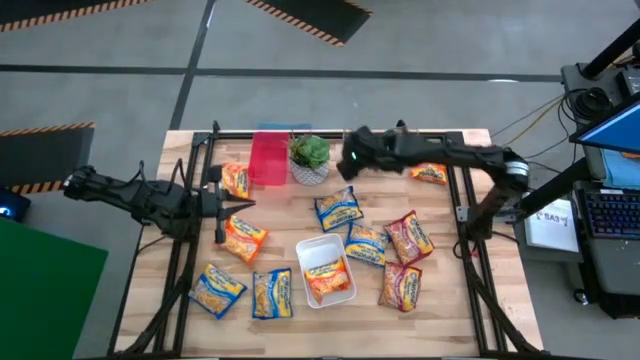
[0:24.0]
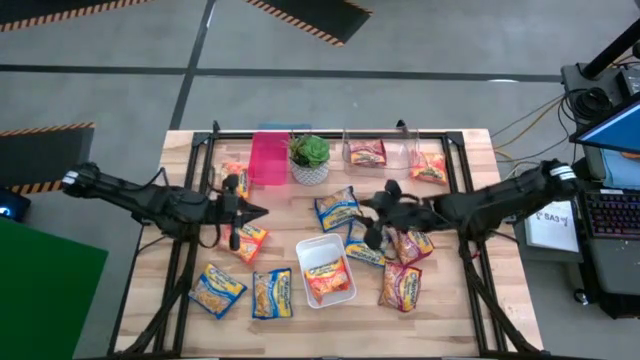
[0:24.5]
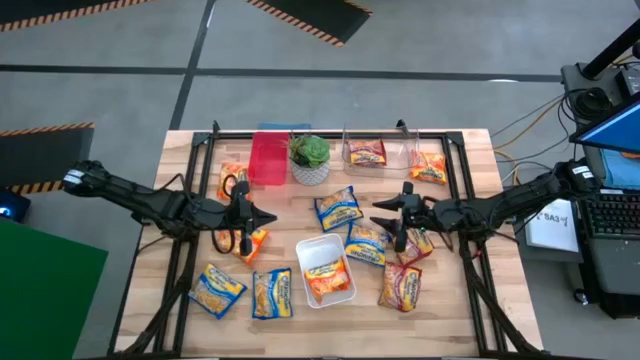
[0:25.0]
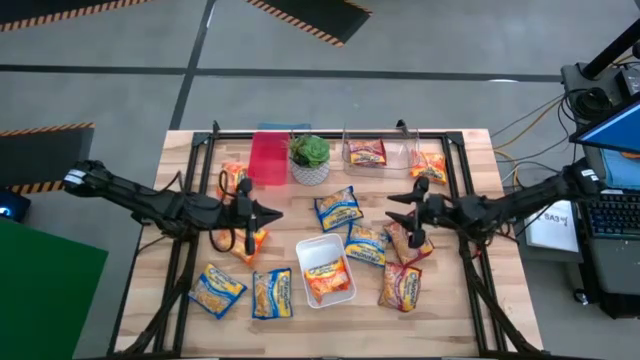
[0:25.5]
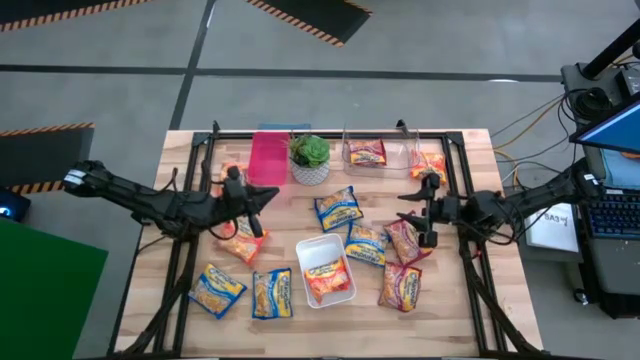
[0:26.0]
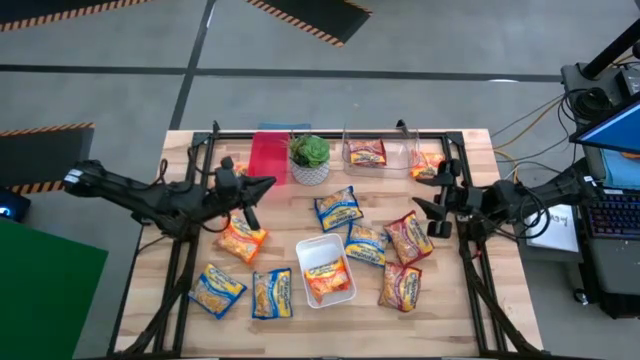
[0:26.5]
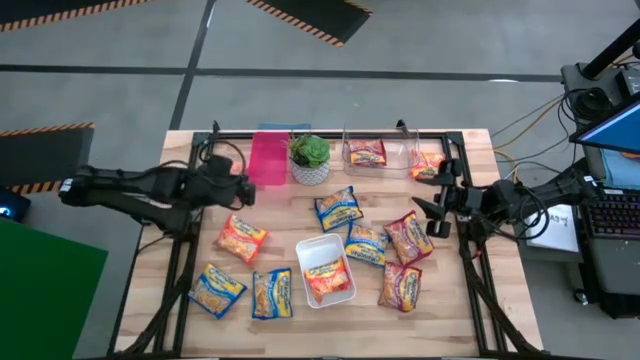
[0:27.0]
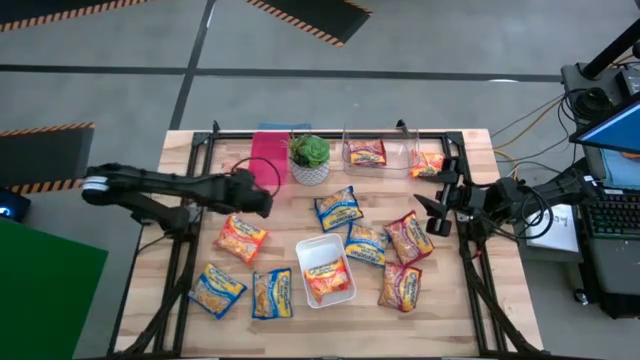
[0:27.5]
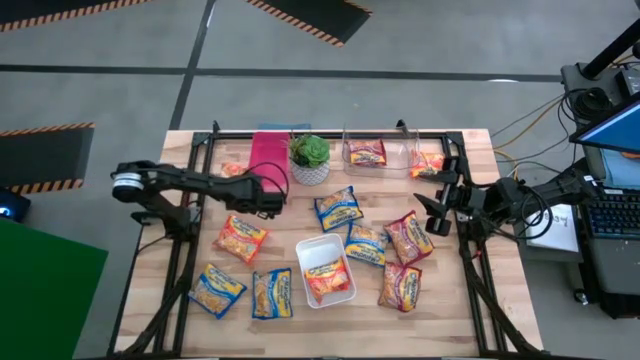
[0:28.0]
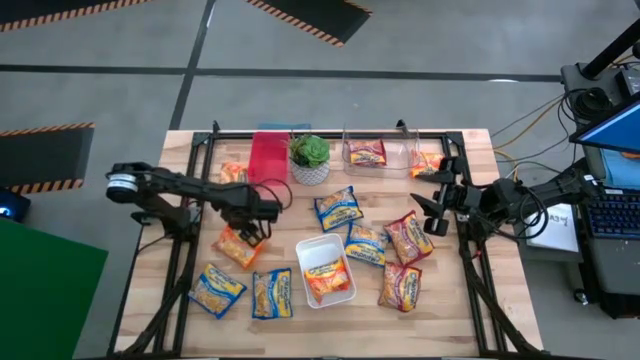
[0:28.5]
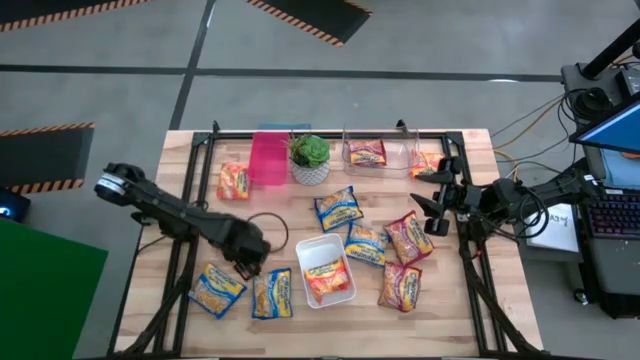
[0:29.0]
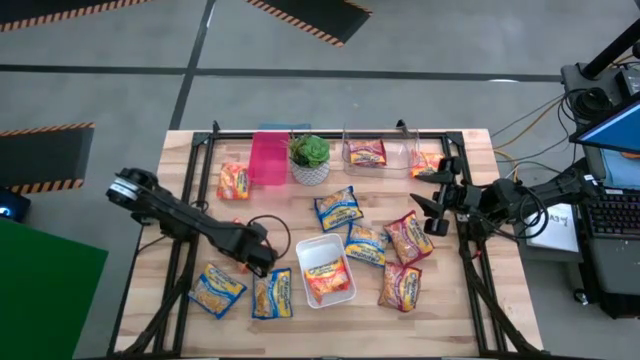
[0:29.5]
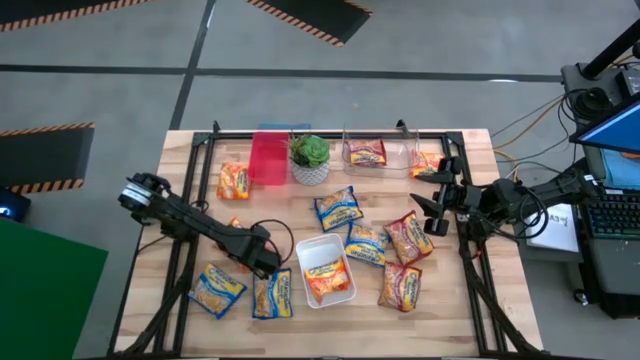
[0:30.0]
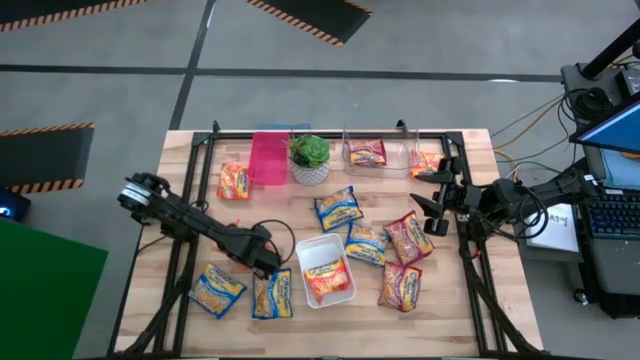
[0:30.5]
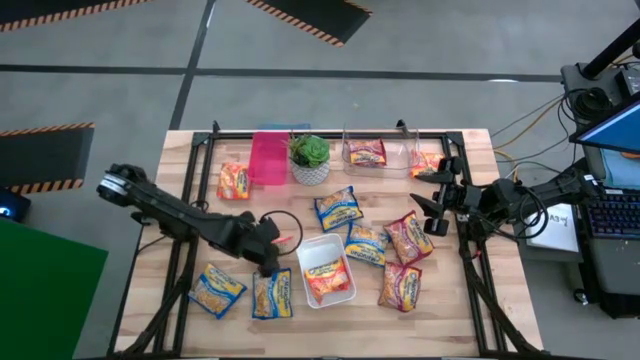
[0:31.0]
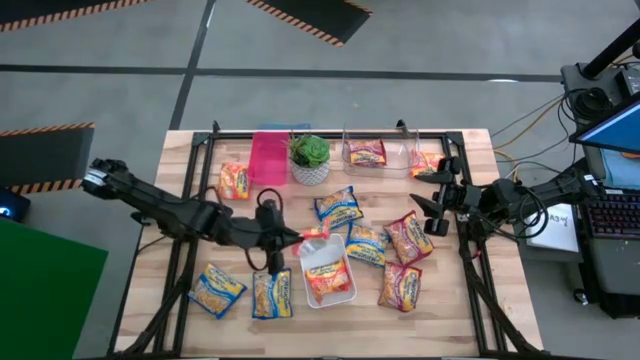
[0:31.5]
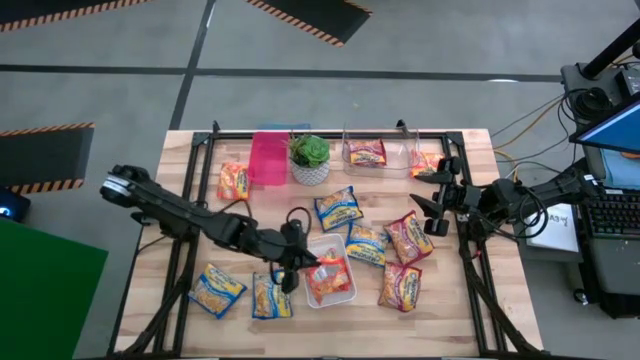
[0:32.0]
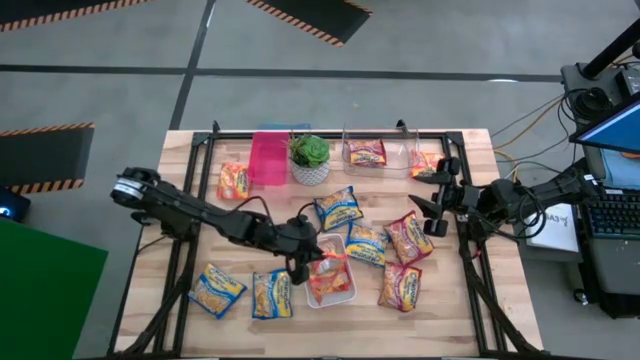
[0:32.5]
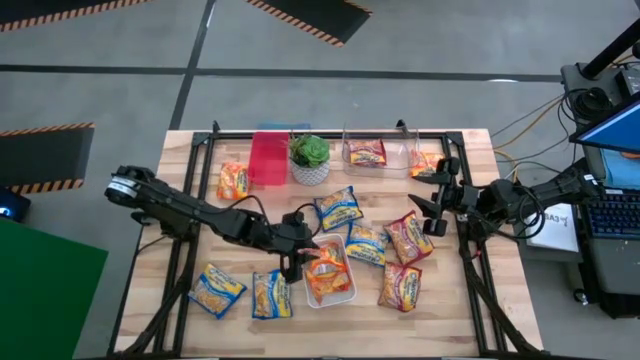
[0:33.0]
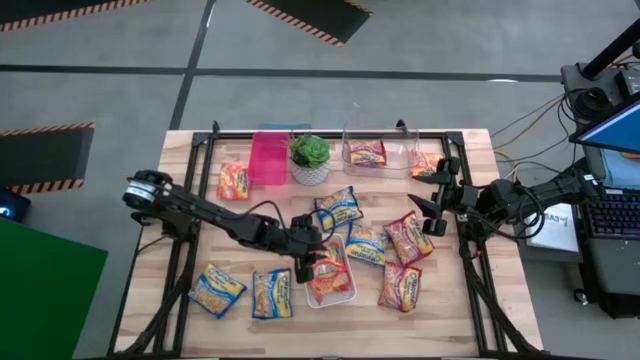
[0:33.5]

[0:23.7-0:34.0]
Task: Sort Maruchan noodles
Put the orange noodle pack into the white bin

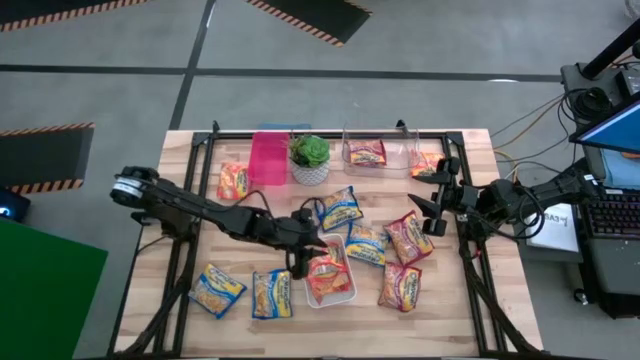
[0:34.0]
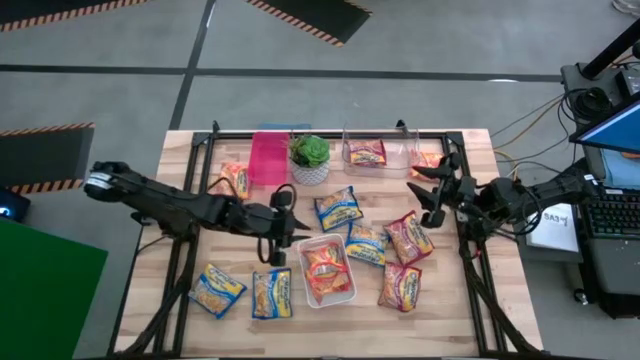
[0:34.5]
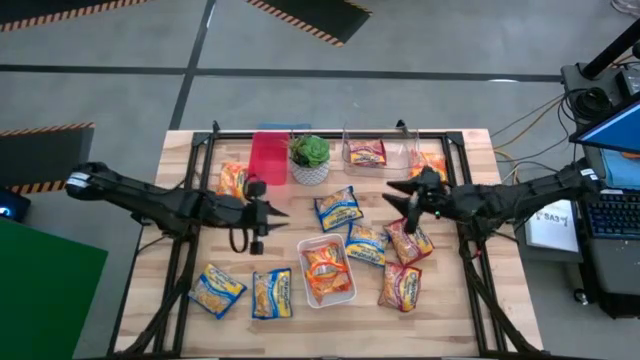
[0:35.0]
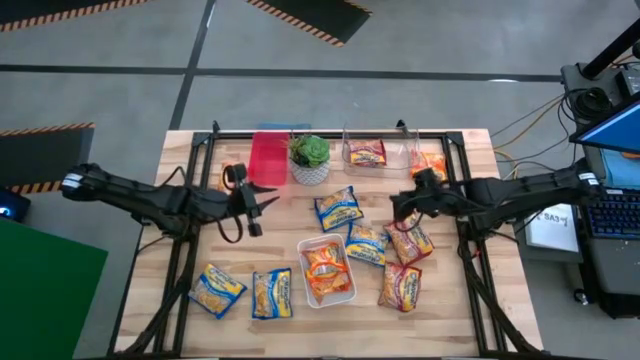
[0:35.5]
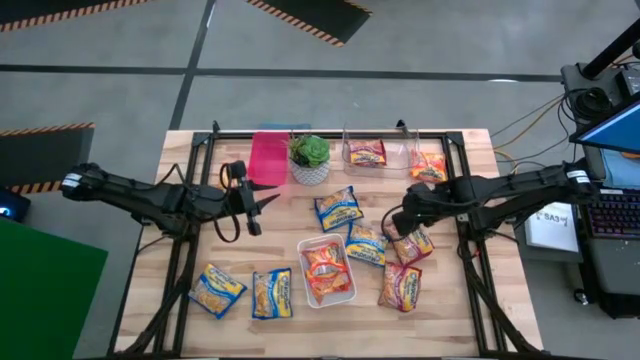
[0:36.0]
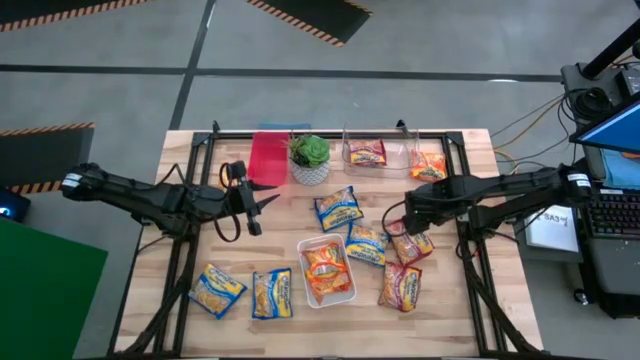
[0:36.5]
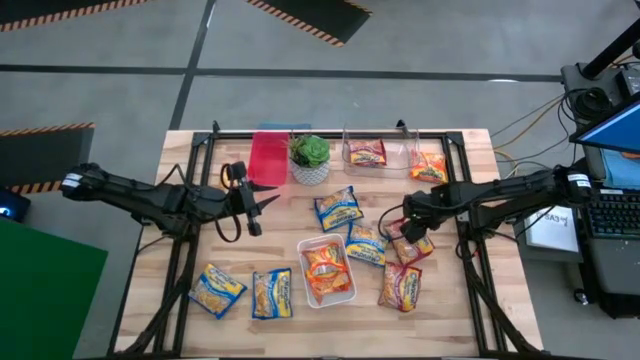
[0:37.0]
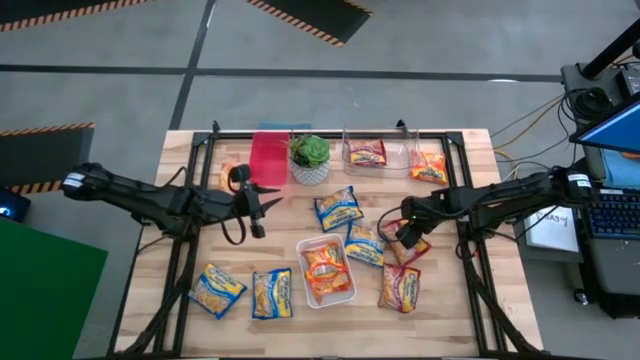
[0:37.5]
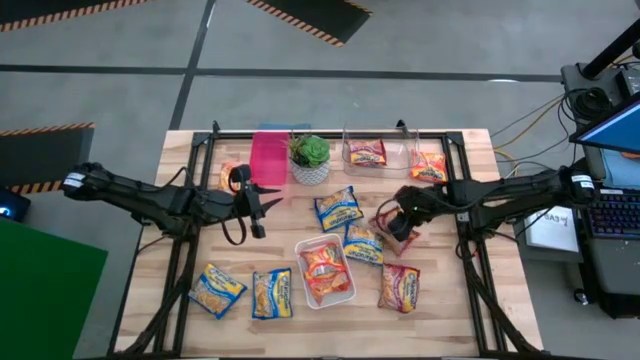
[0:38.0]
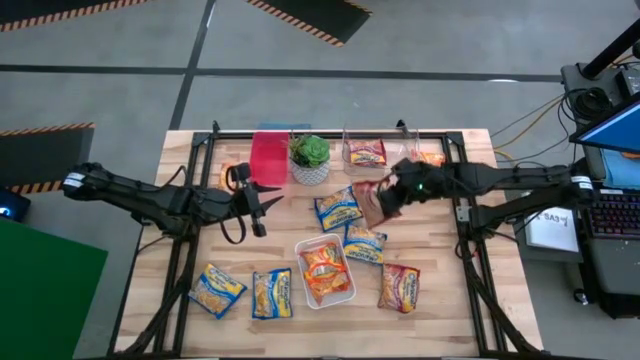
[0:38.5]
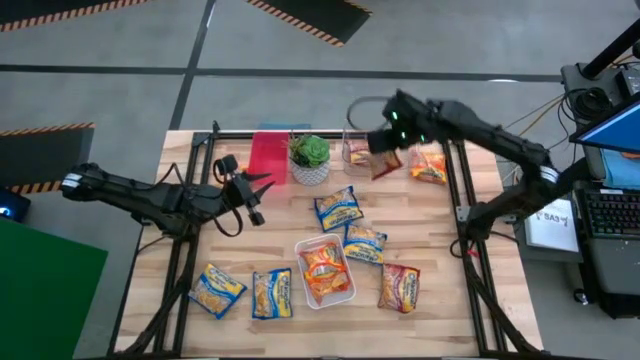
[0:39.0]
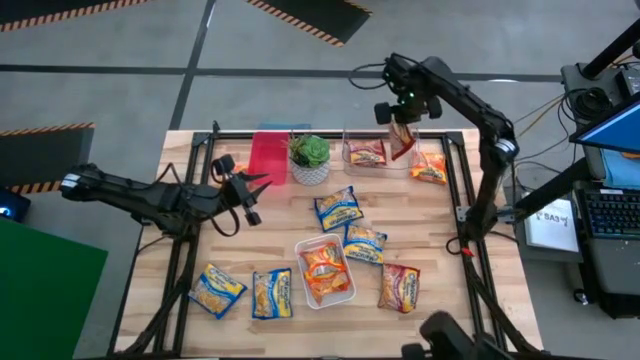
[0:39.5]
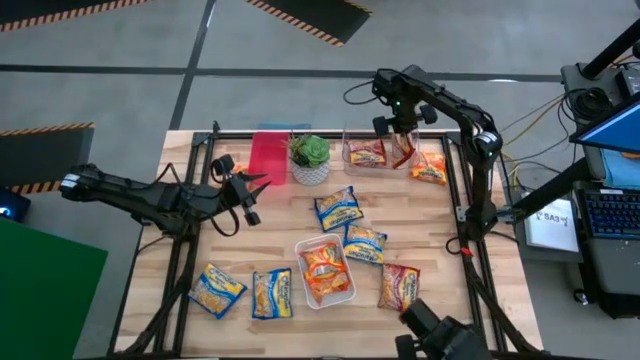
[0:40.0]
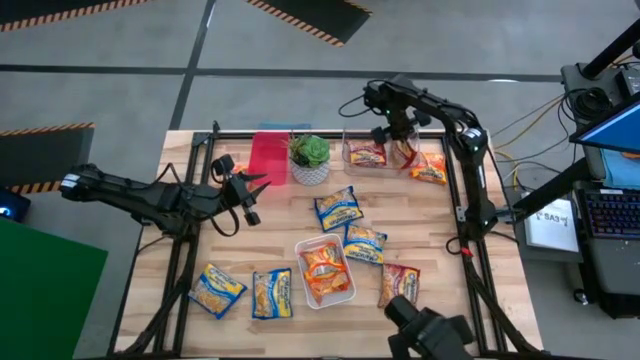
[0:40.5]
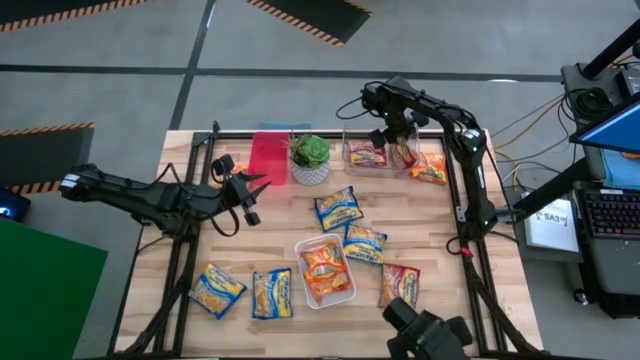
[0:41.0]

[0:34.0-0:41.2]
Put the red noodle pack into the transparent bin

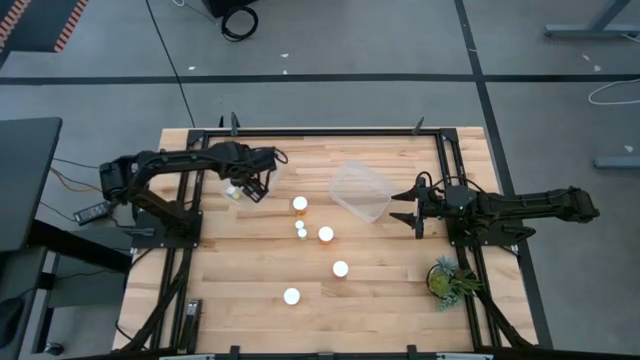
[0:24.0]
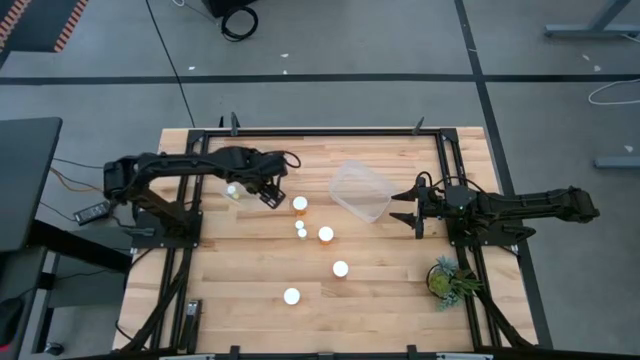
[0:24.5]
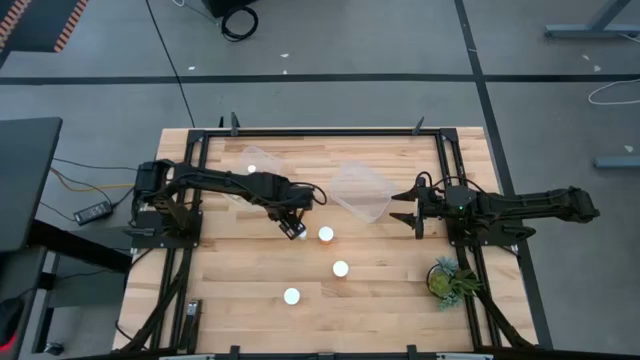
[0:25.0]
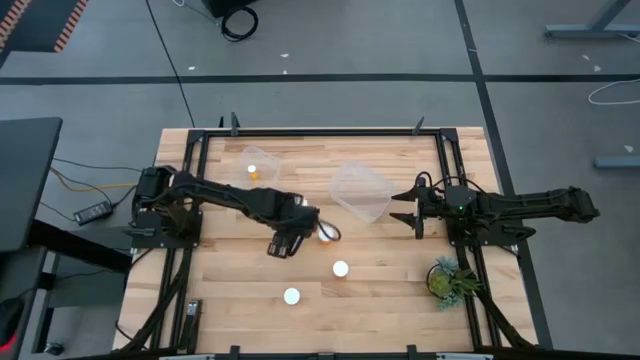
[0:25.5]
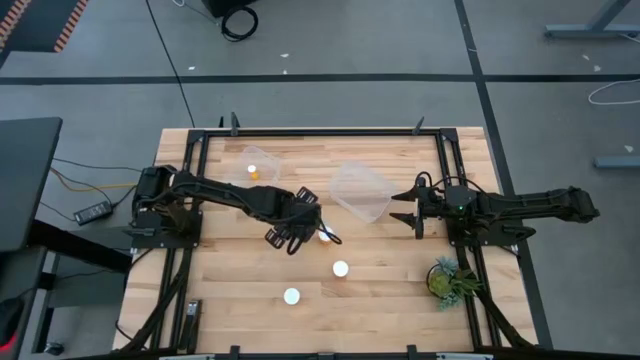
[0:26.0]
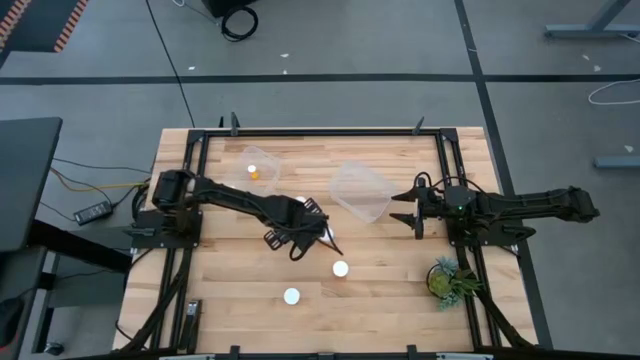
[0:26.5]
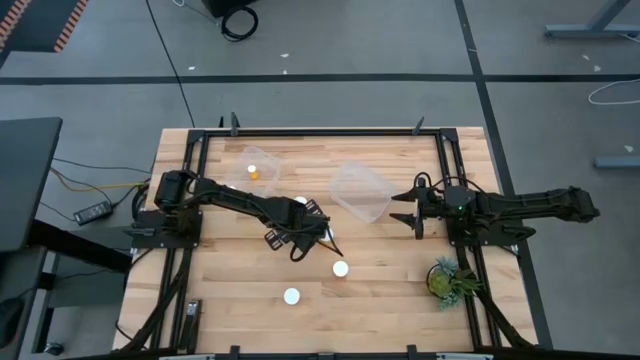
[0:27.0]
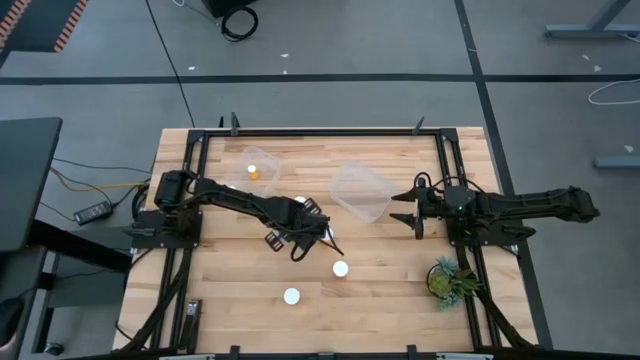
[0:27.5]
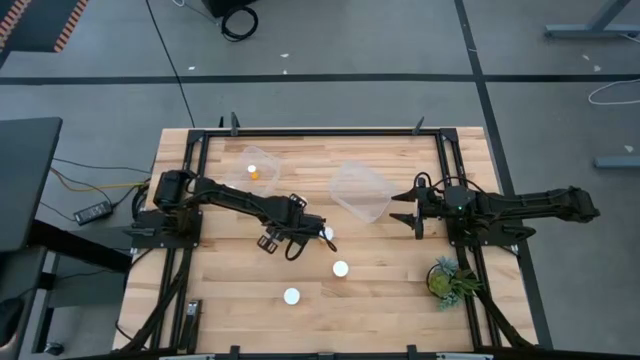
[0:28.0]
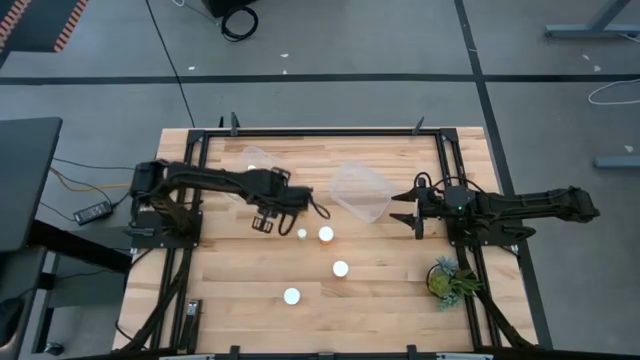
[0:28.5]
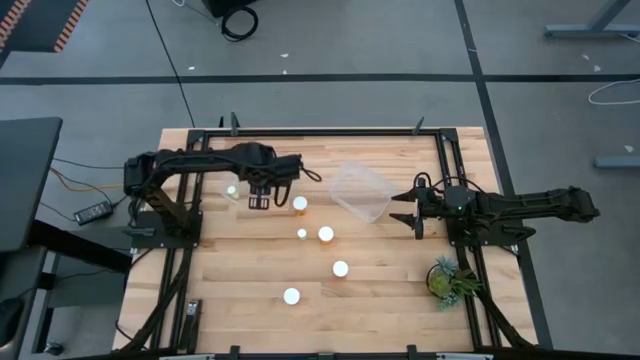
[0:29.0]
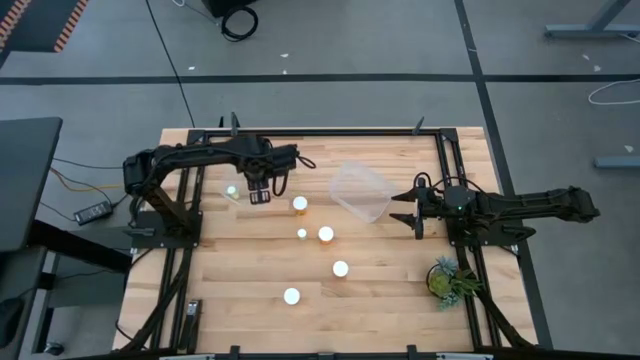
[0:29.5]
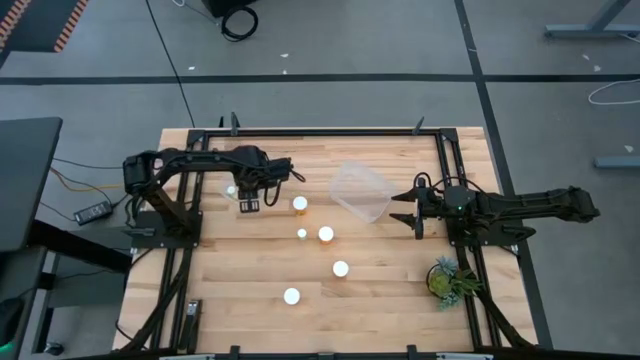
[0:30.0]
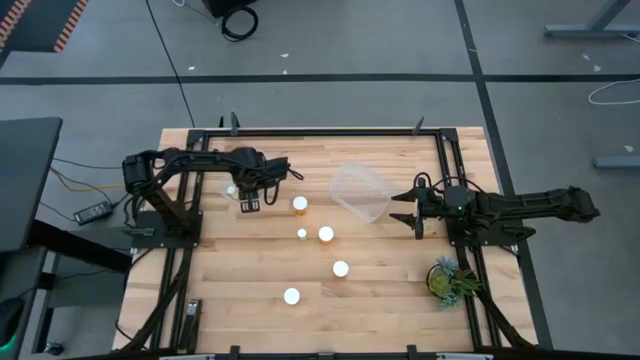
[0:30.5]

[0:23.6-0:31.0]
Task: Pick and place medicine bottles into bin by pill shape (circle, oval)
Put the small yellow pill bottle into the left transparent bin
